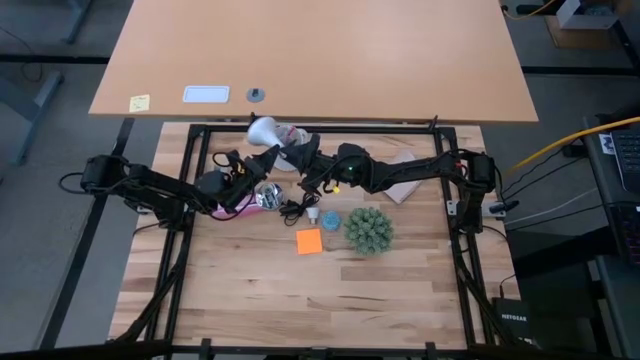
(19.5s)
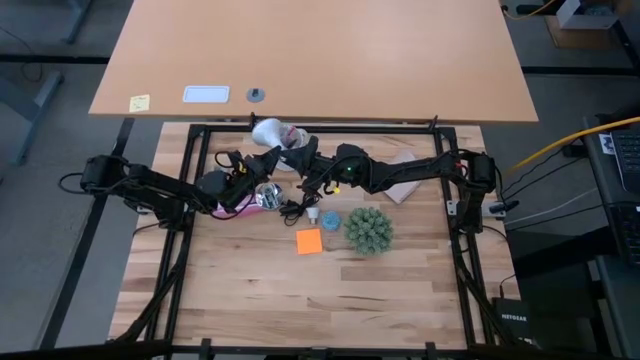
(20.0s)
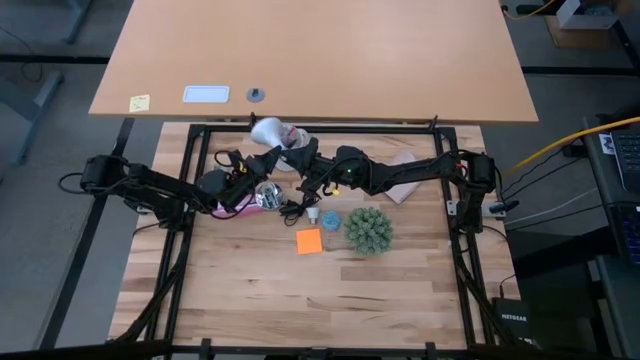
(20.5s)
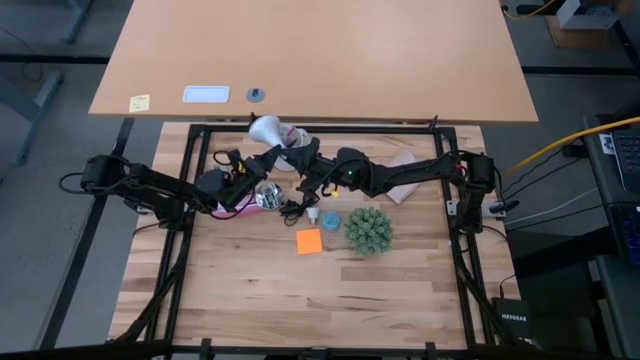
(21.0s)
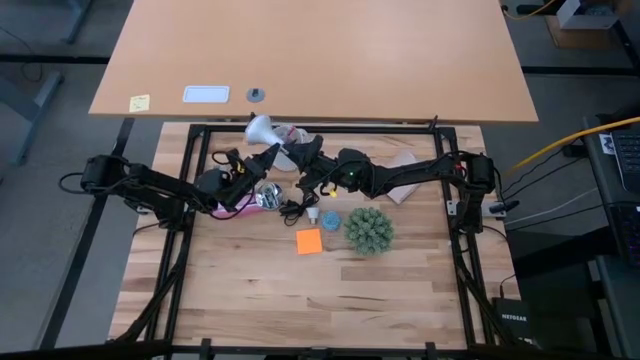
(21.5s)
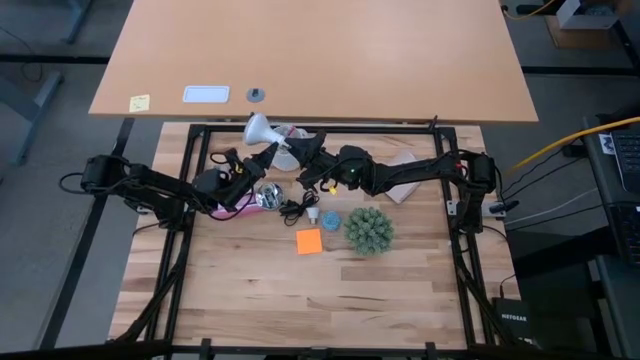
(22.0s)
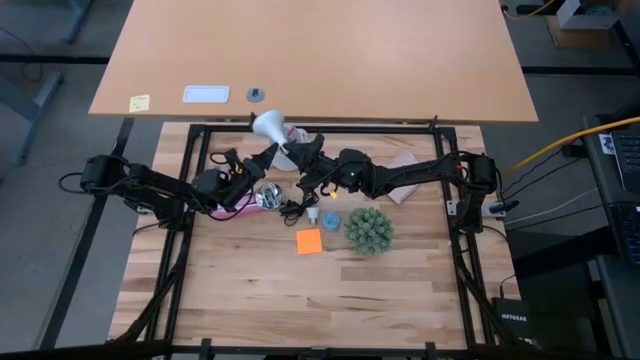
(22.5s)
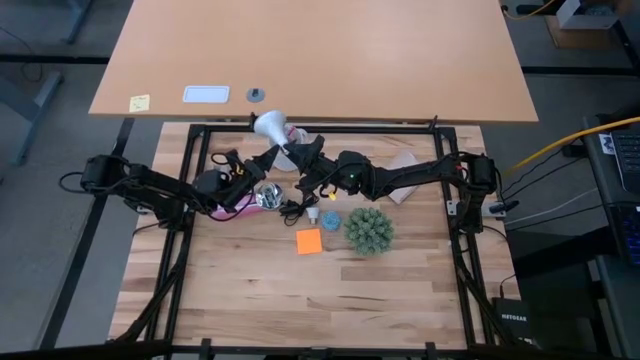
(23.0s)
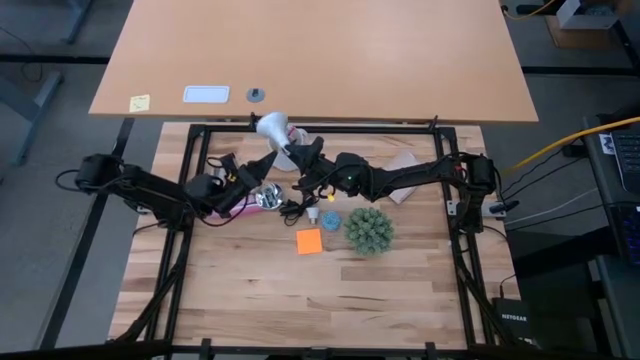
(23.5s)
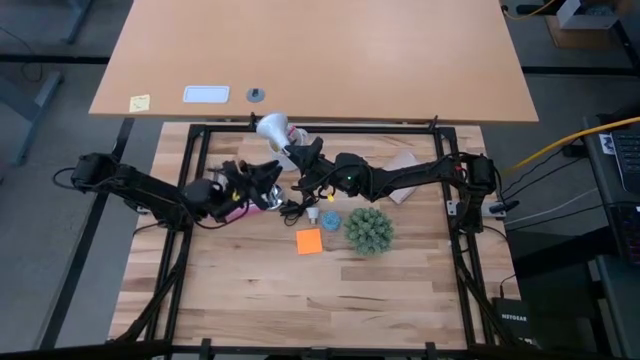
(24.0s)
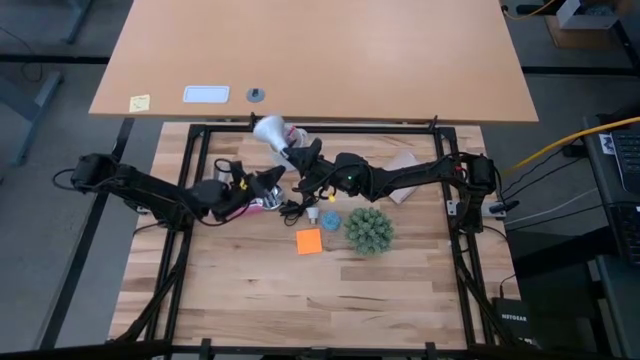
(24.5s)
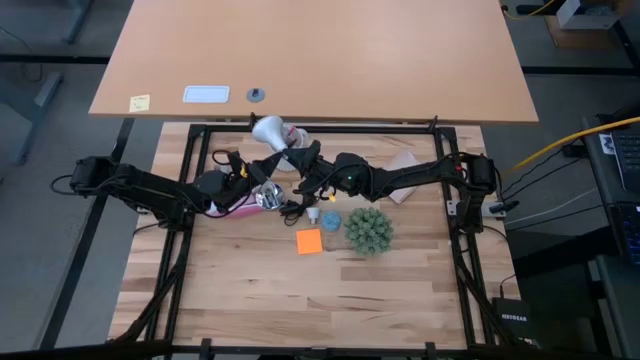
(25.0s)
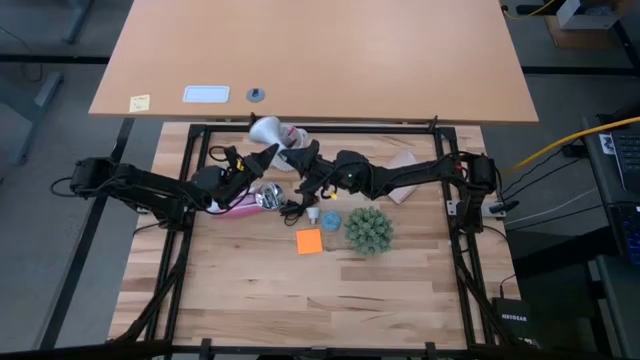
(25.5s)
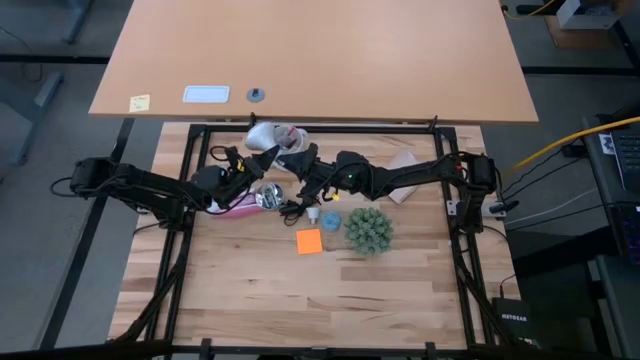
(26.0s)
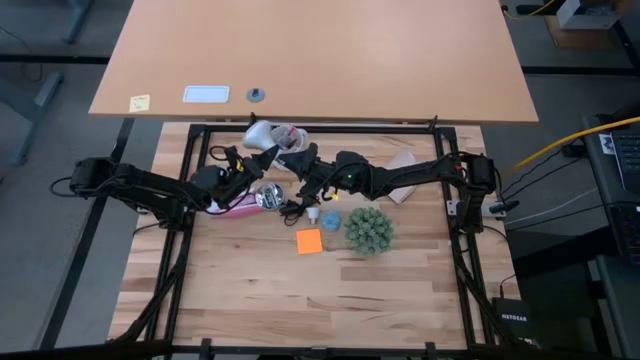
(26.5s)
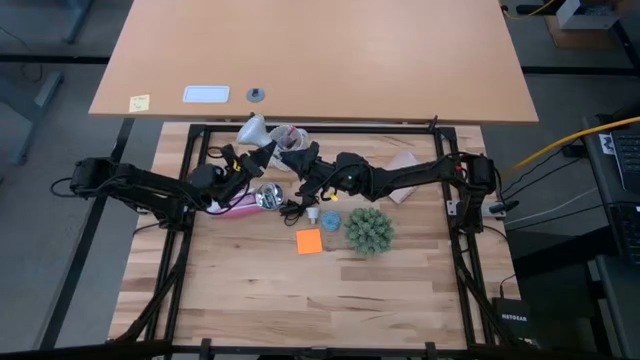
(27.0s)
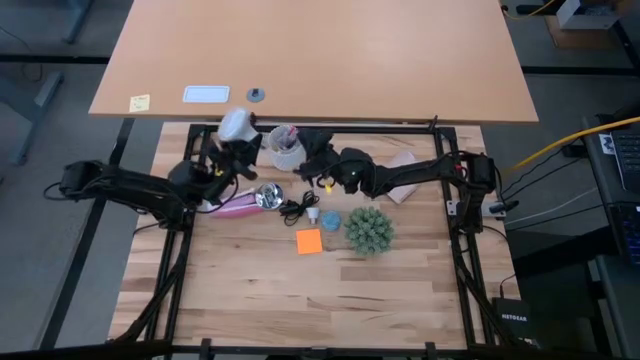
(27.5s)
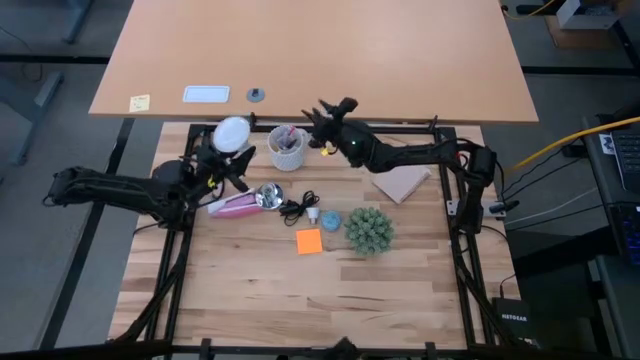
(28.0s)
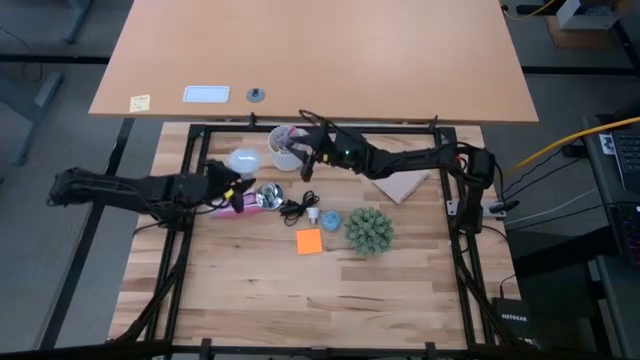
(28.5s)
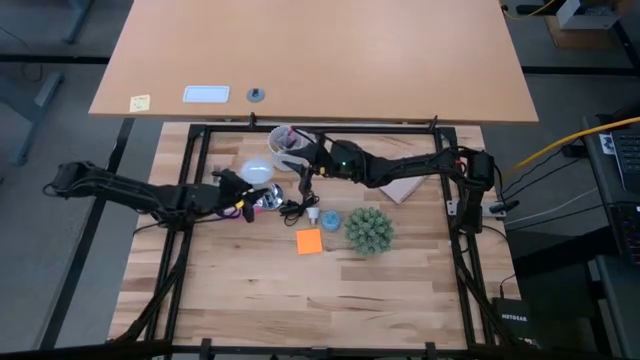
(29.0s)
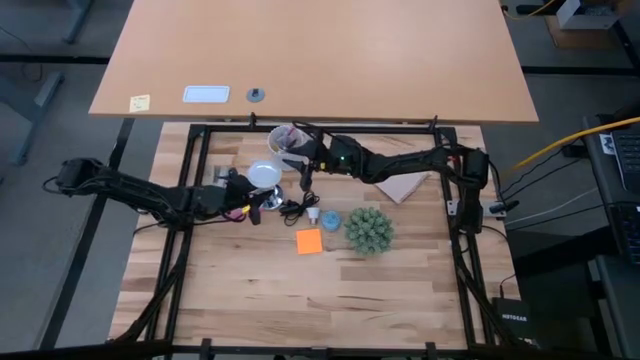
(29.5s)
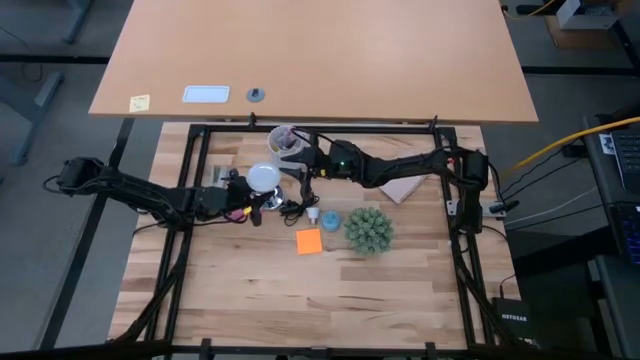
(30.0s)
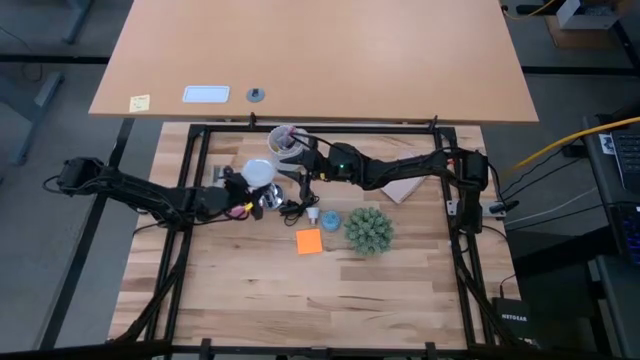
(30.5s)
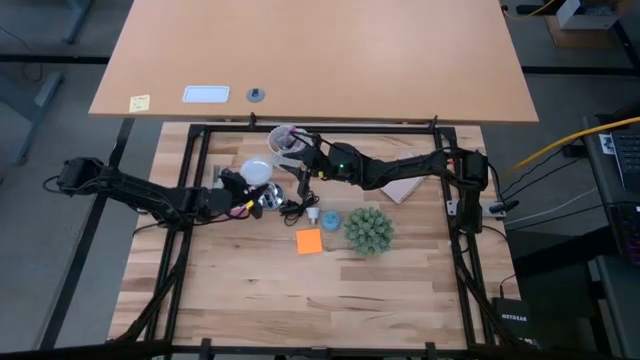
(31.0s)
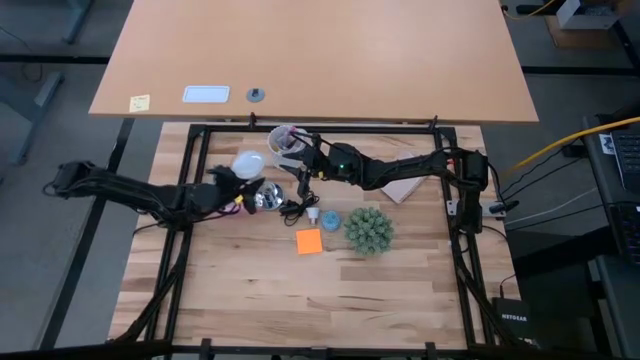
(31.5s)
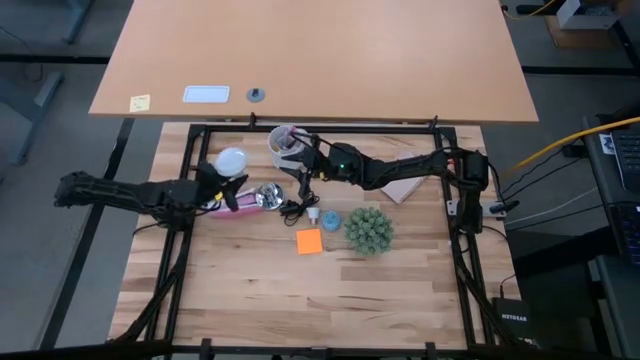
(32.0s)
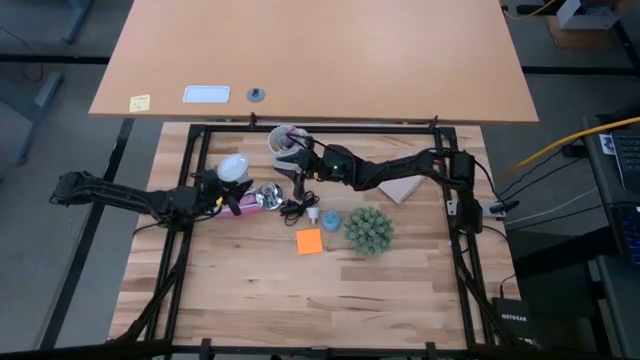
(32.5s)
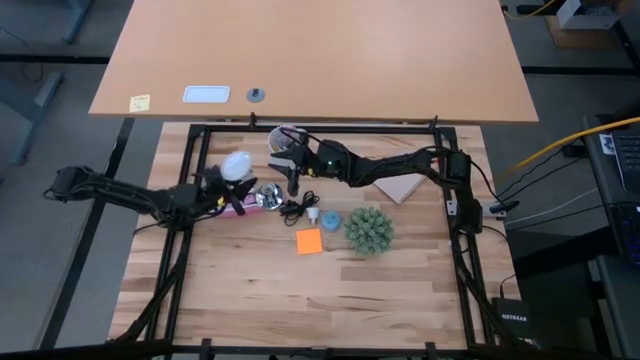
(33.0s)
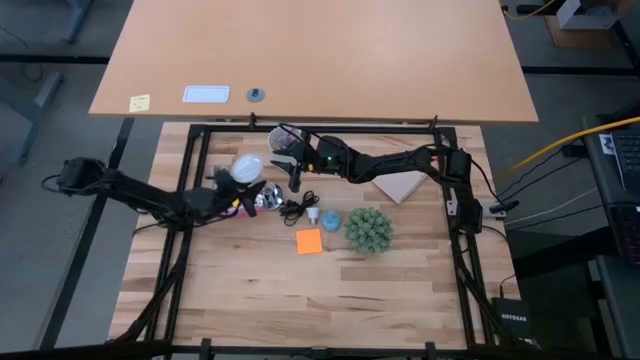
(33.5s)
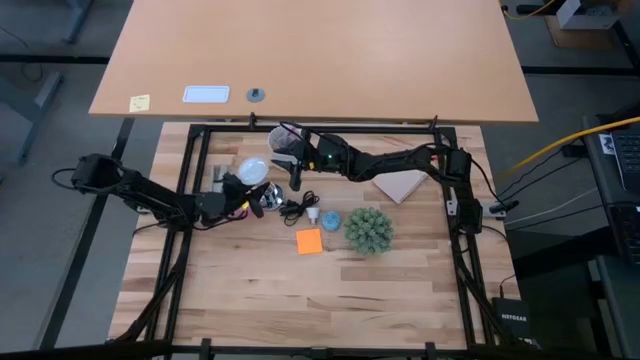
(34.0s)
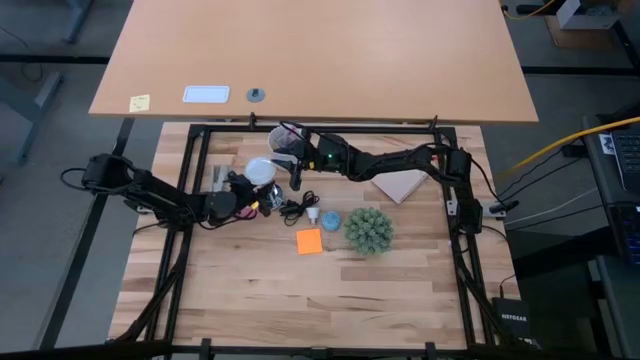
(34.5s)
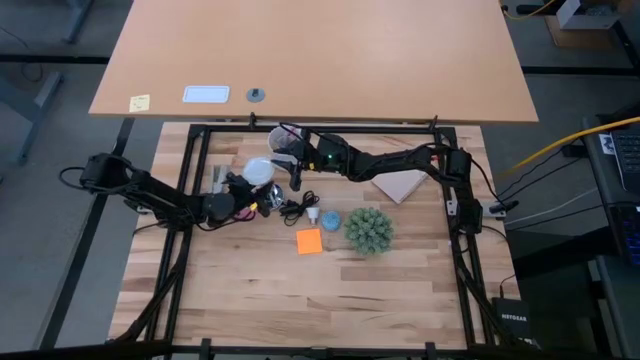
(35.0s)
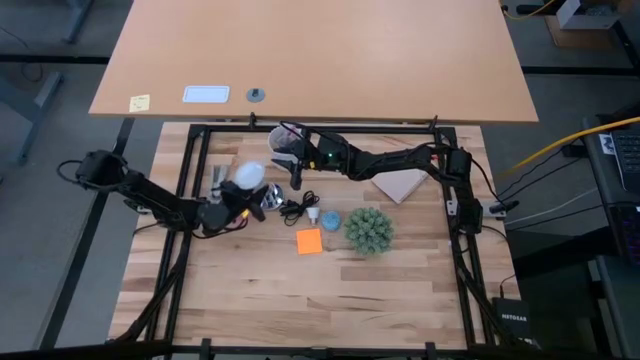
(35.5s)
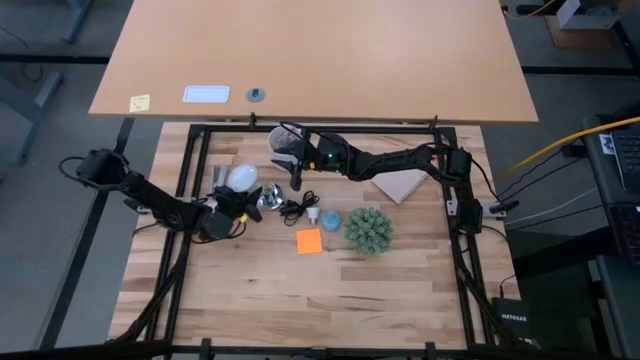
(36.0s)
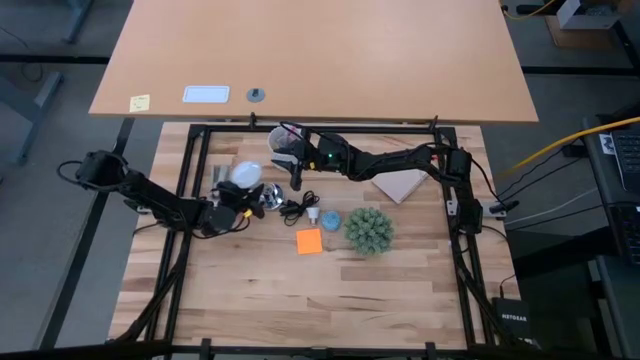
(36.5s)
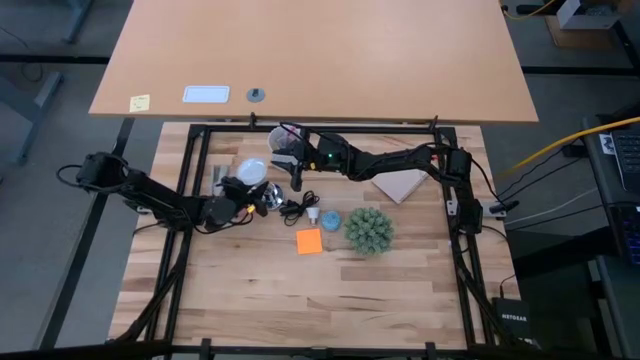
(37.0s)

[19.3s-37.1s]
Task: Screw lightbulb
Insert the lightbulb into the silver lamp

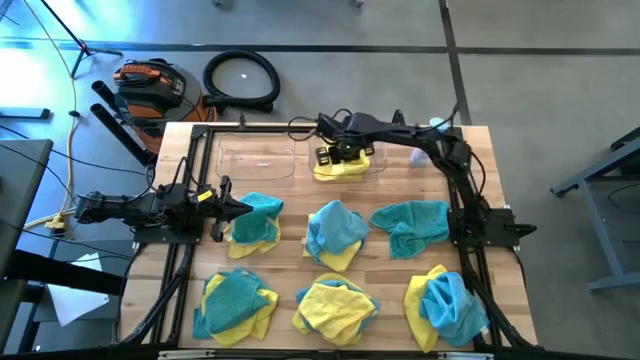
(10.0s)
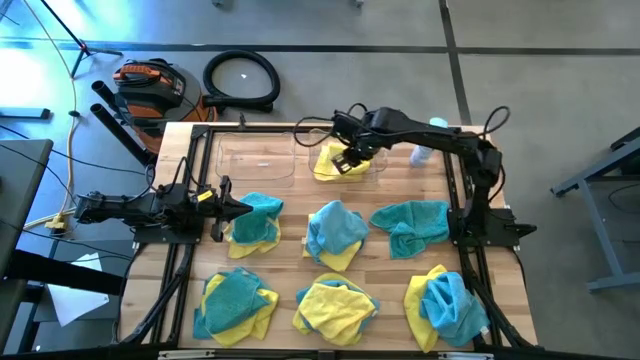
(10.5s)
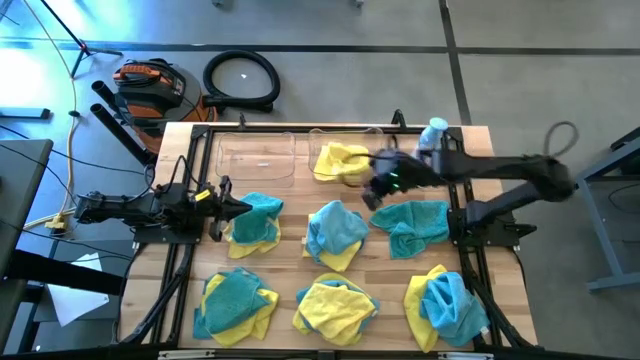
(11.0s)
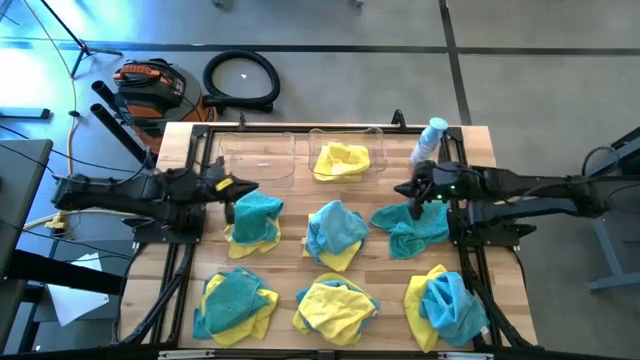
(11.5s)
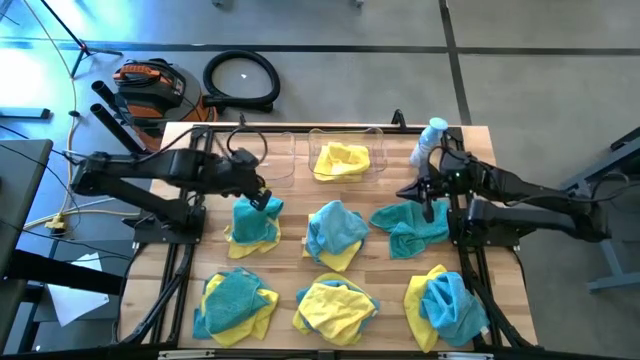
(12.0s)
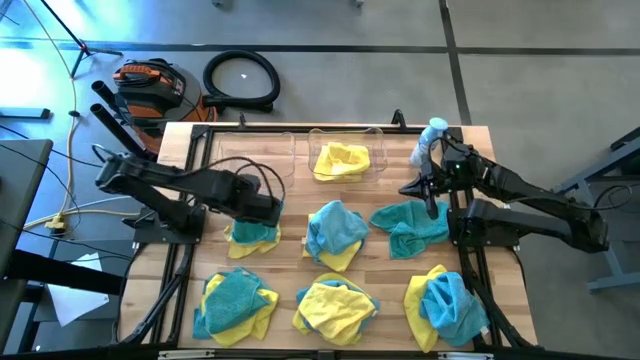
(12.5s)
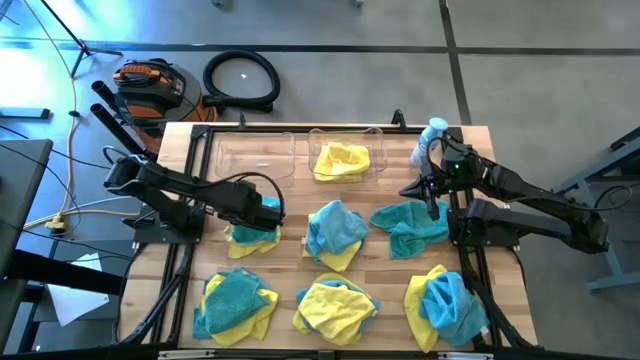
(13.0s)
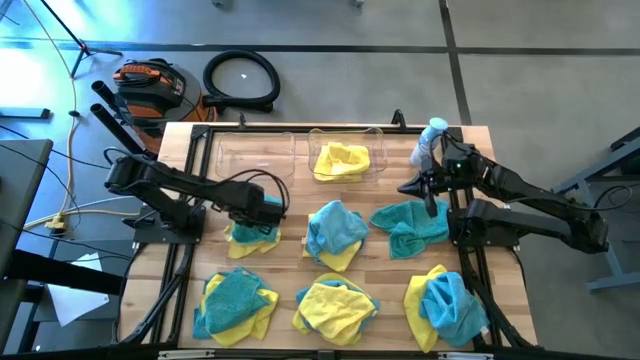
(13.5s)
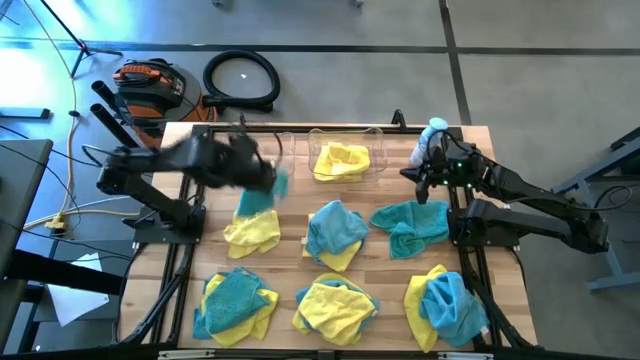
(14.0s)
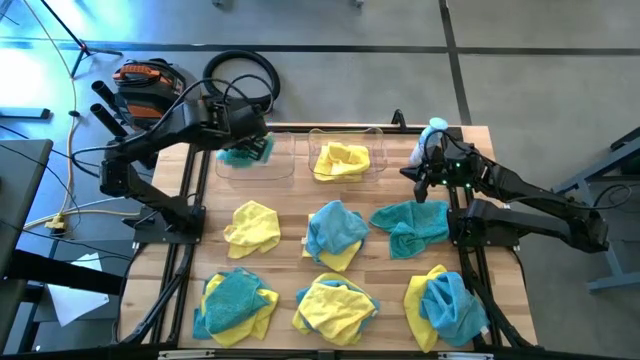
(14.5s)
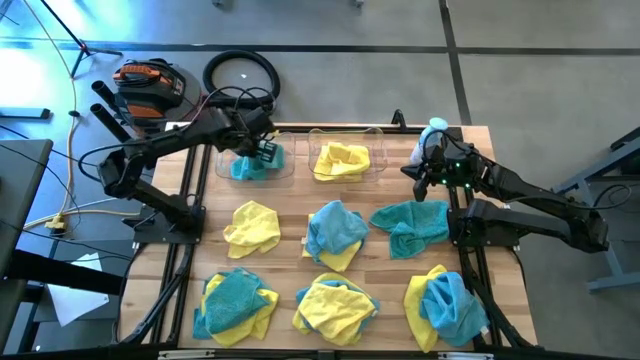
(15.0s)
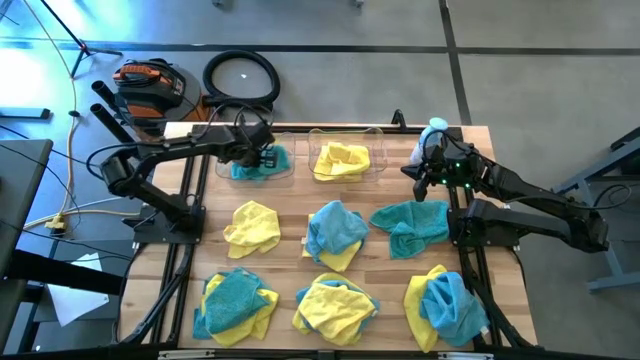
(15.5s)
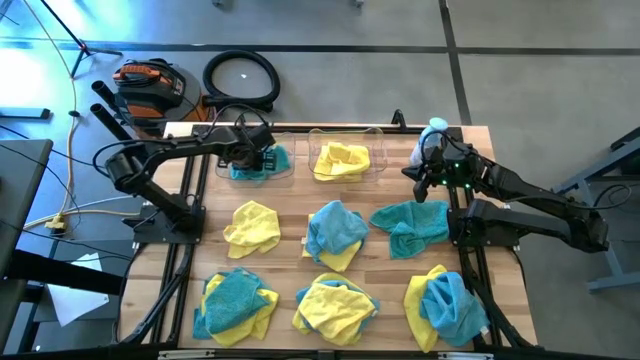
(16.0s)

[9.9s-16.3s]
Task: Sort microfiber towel by color & place in baskets
Put the blue towel into the left transparent bin
